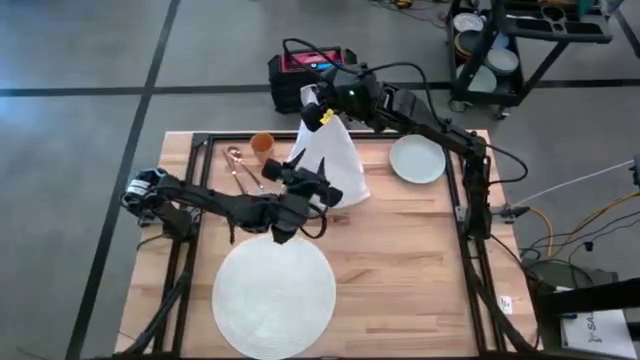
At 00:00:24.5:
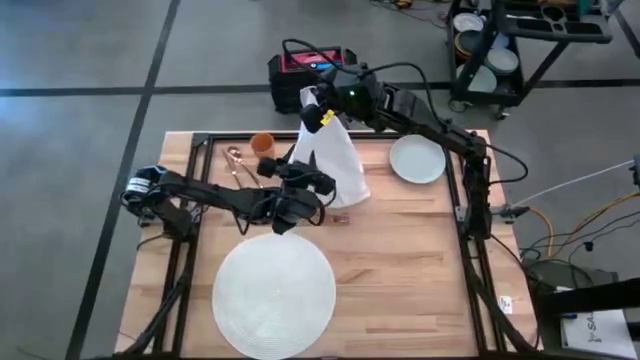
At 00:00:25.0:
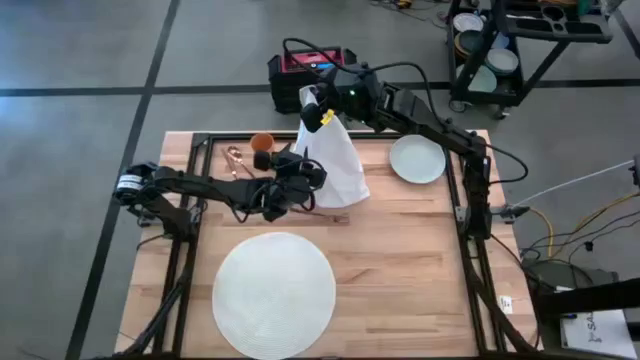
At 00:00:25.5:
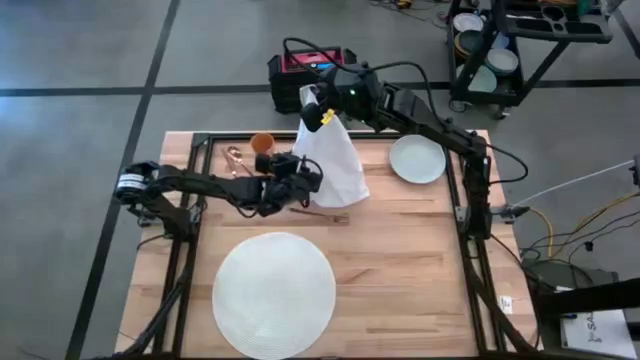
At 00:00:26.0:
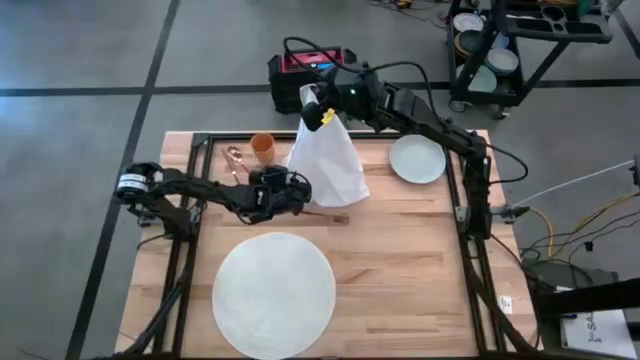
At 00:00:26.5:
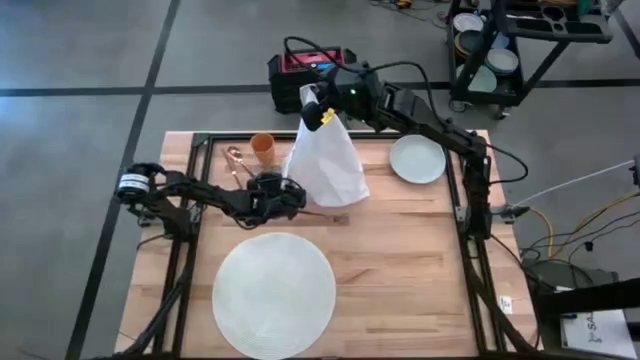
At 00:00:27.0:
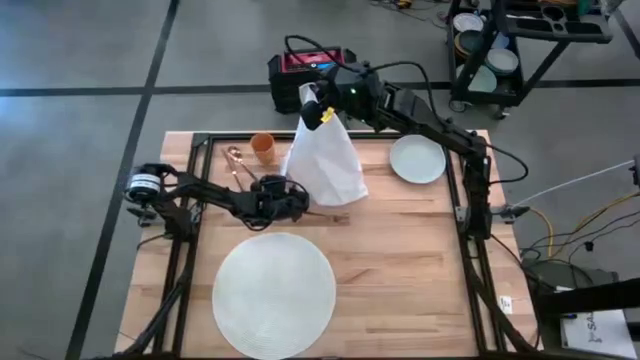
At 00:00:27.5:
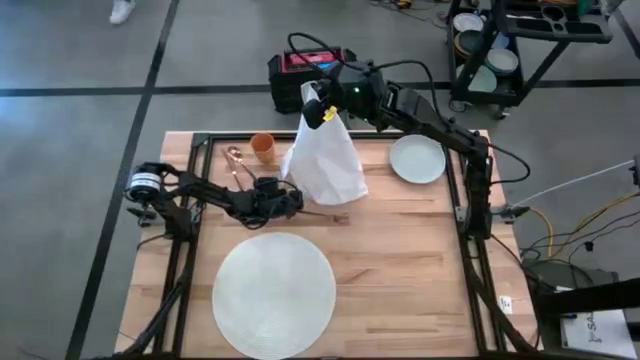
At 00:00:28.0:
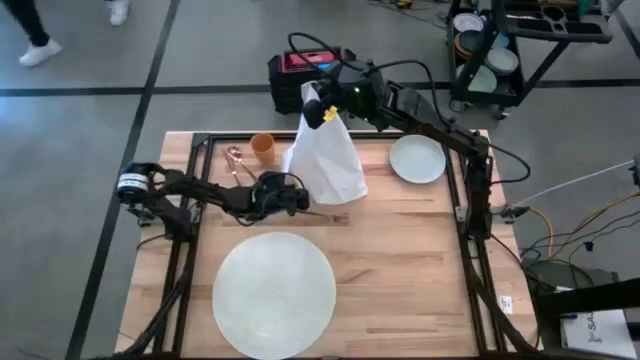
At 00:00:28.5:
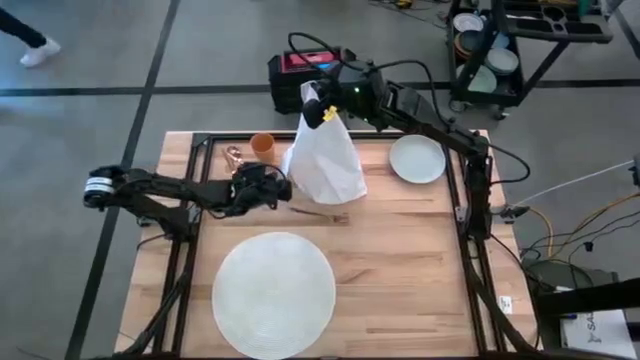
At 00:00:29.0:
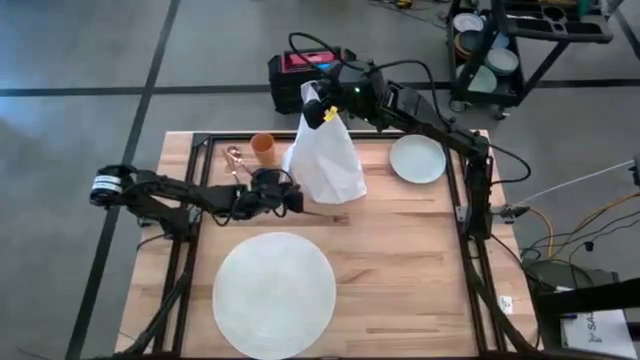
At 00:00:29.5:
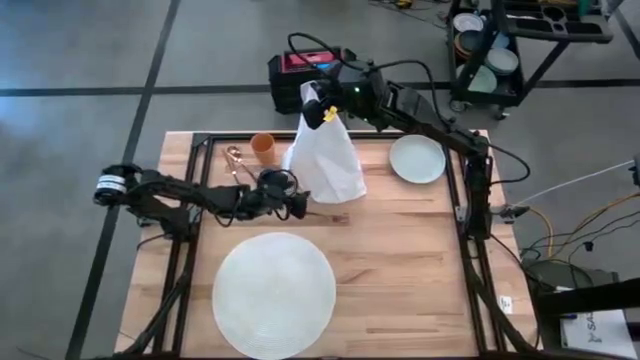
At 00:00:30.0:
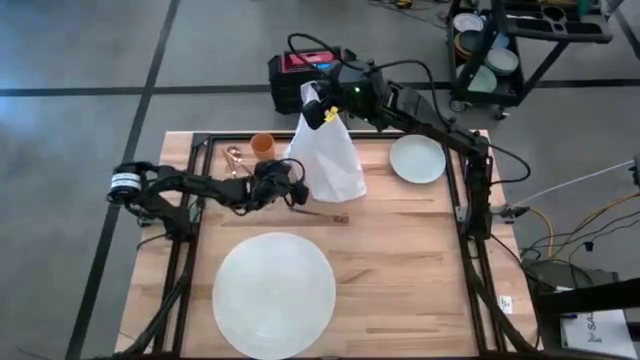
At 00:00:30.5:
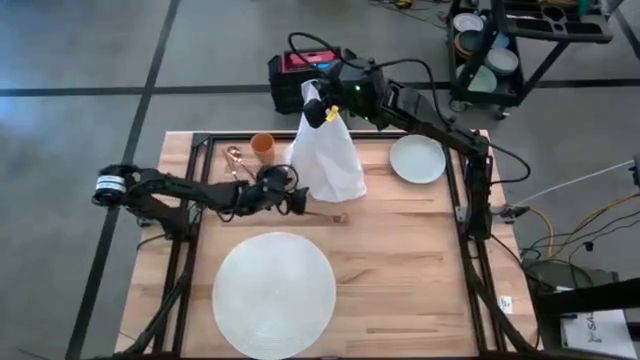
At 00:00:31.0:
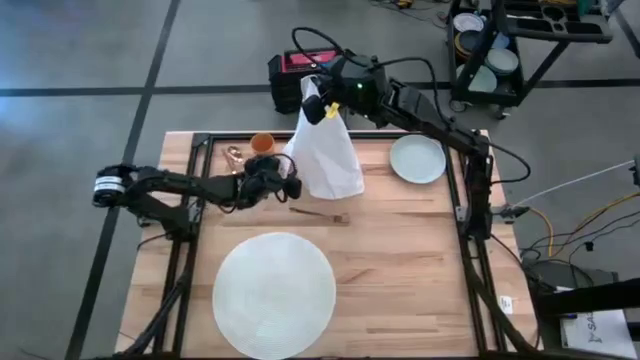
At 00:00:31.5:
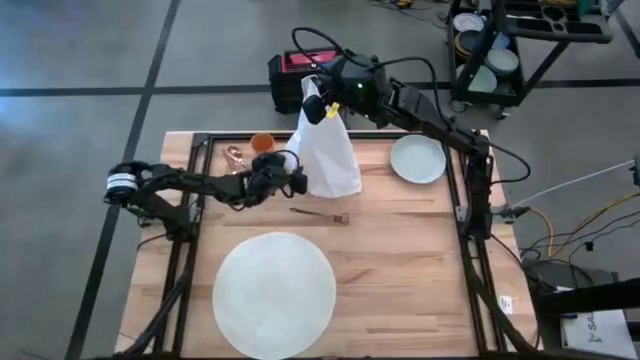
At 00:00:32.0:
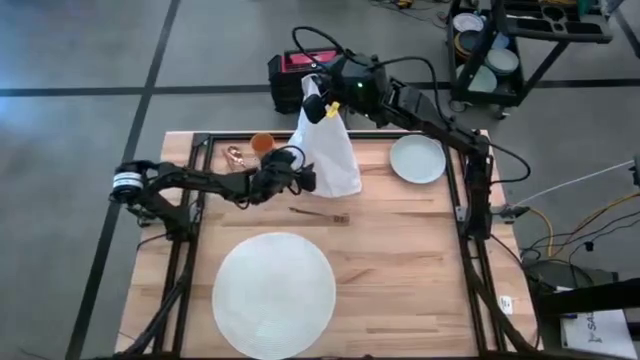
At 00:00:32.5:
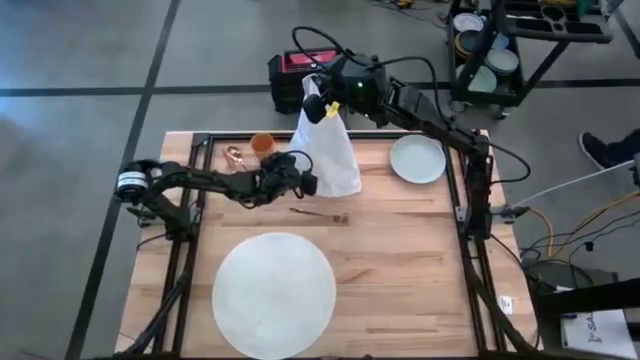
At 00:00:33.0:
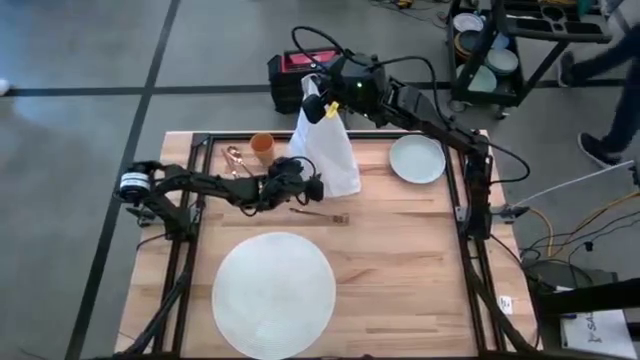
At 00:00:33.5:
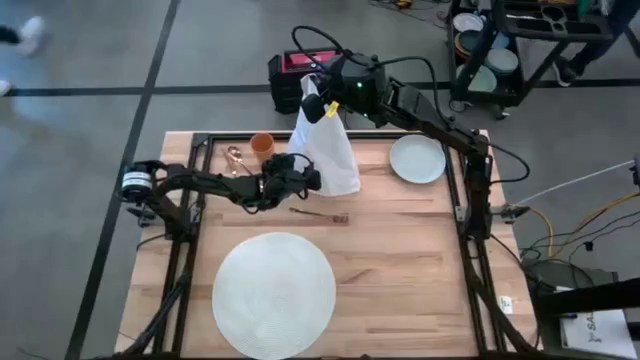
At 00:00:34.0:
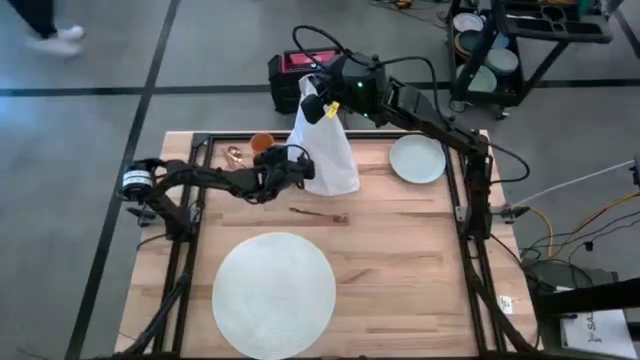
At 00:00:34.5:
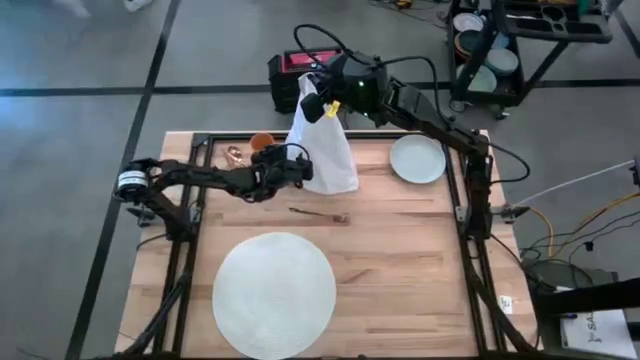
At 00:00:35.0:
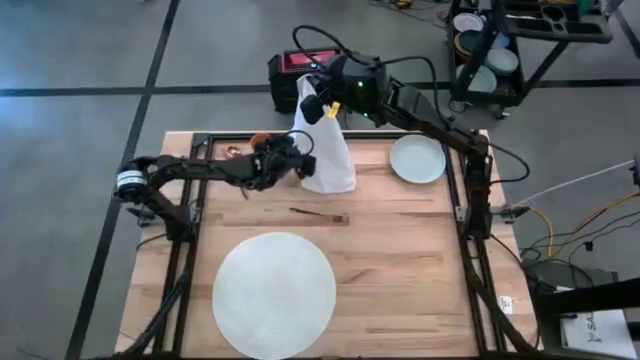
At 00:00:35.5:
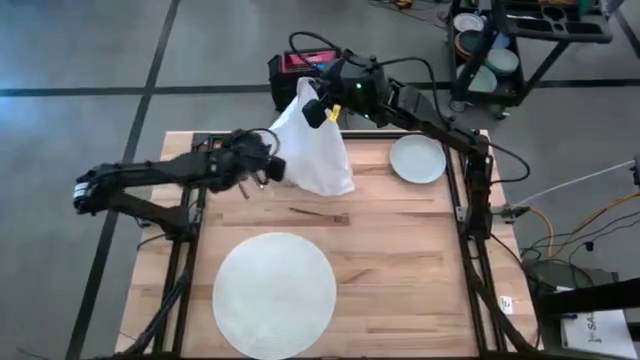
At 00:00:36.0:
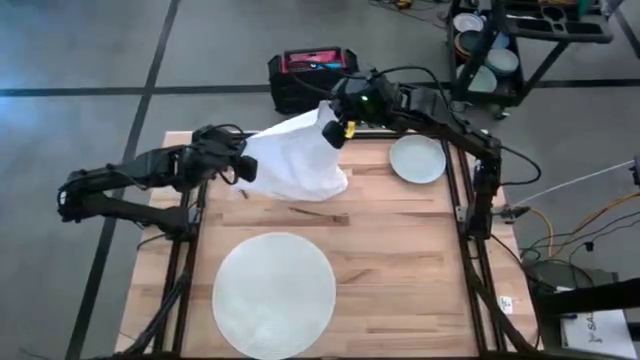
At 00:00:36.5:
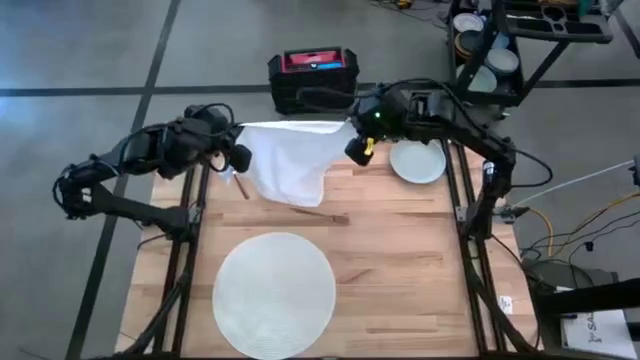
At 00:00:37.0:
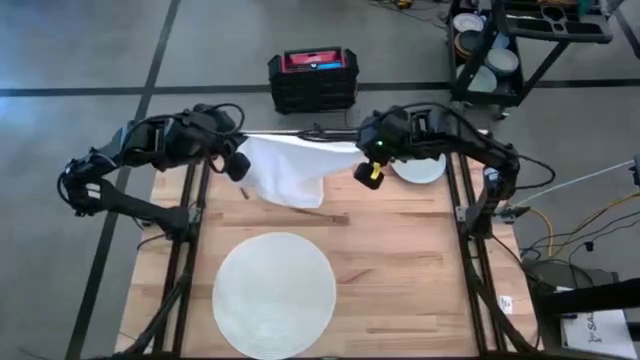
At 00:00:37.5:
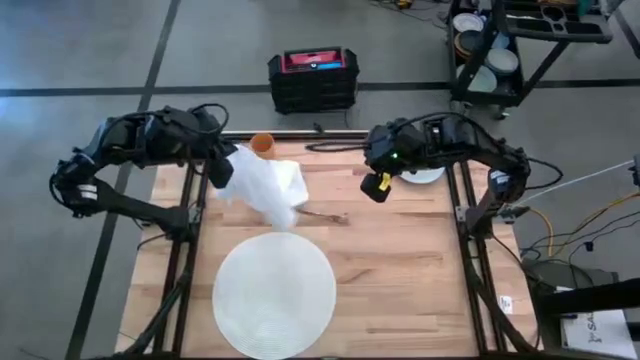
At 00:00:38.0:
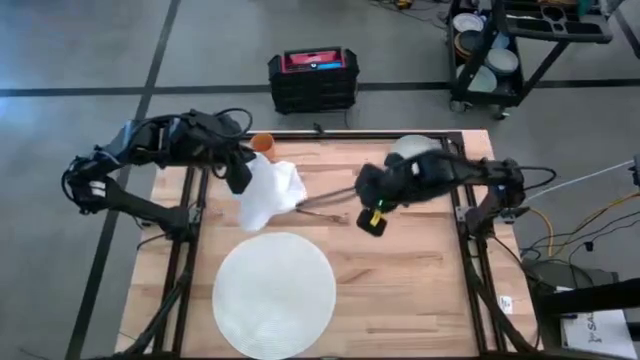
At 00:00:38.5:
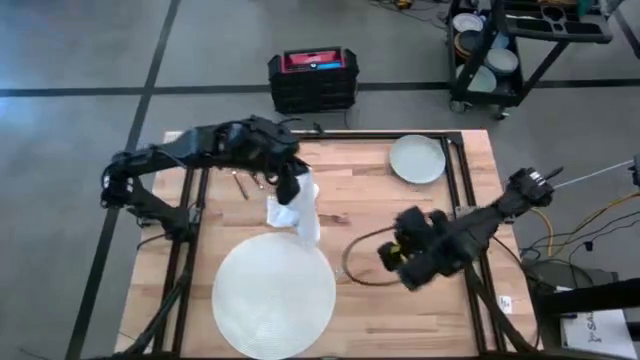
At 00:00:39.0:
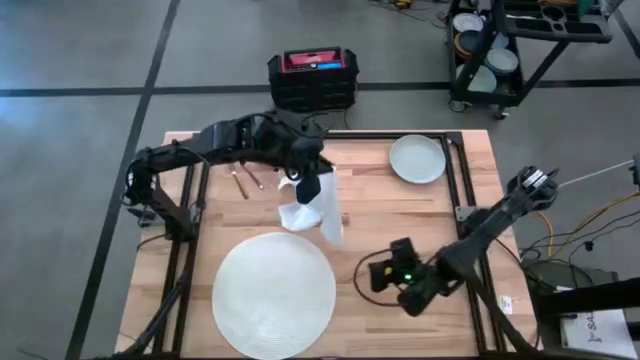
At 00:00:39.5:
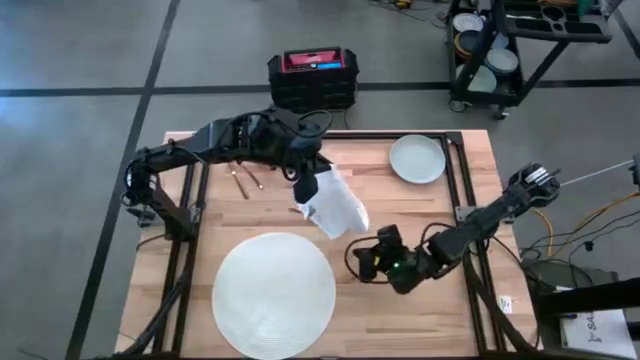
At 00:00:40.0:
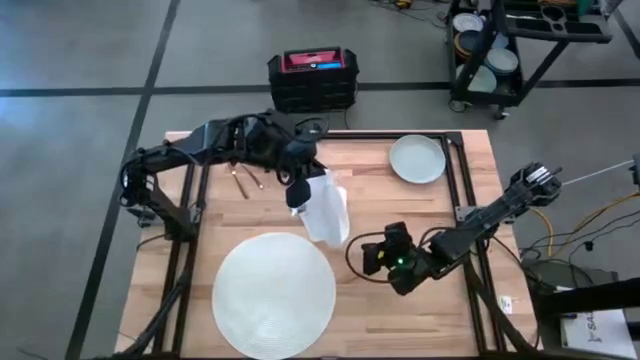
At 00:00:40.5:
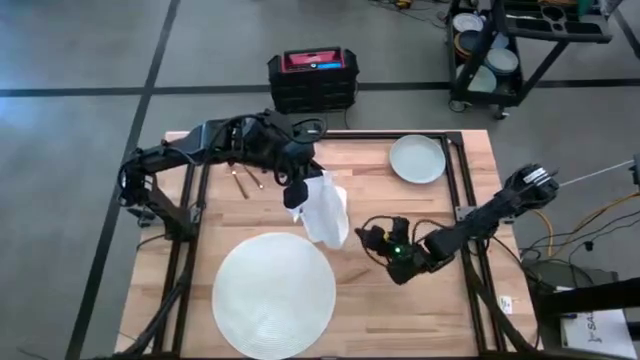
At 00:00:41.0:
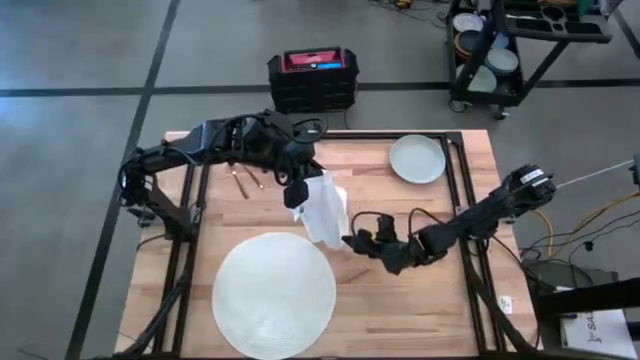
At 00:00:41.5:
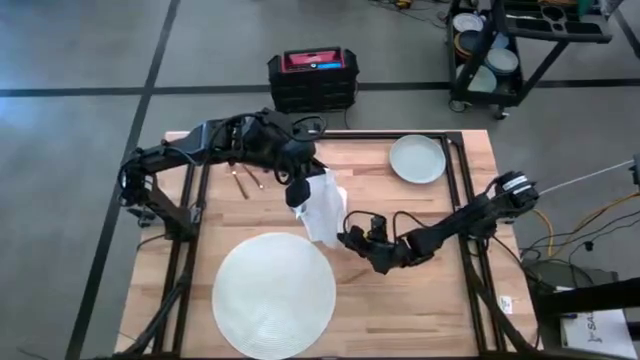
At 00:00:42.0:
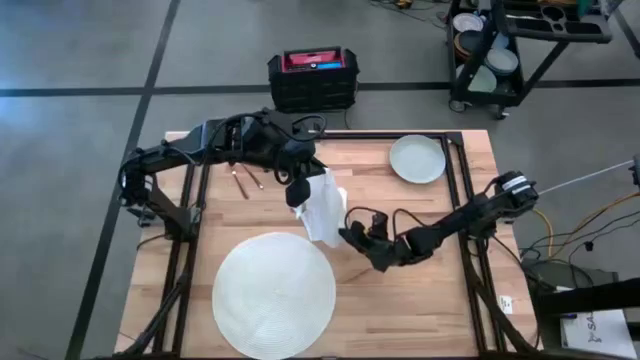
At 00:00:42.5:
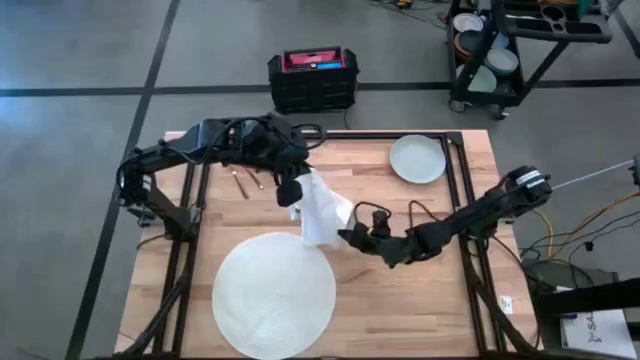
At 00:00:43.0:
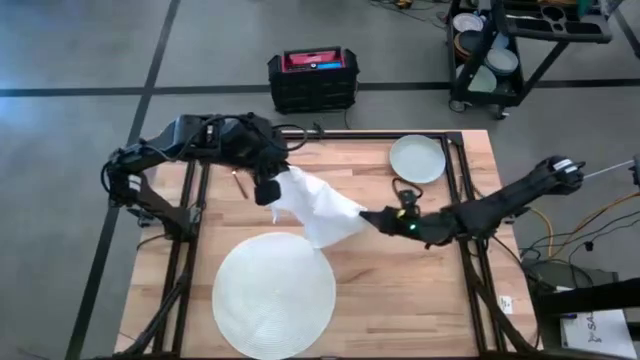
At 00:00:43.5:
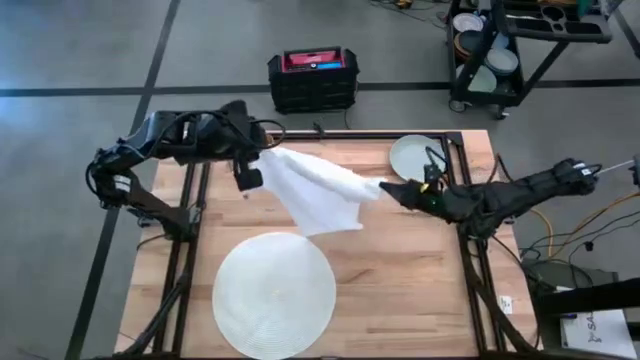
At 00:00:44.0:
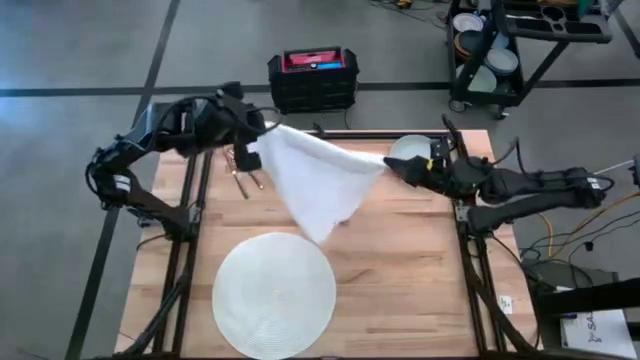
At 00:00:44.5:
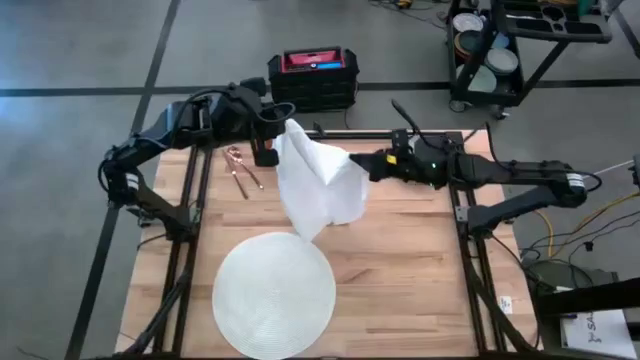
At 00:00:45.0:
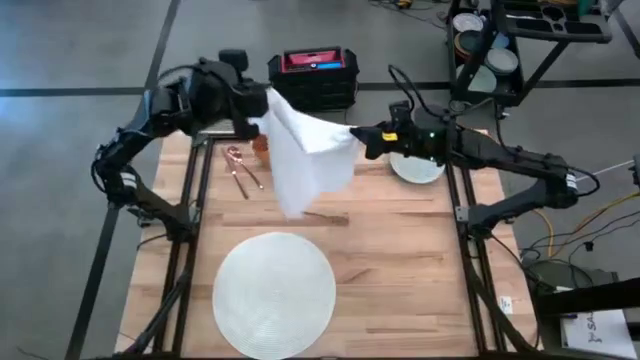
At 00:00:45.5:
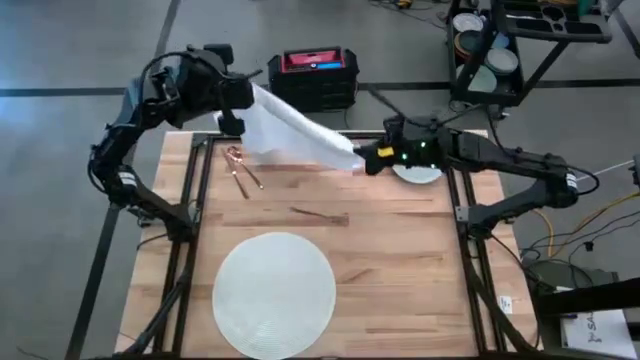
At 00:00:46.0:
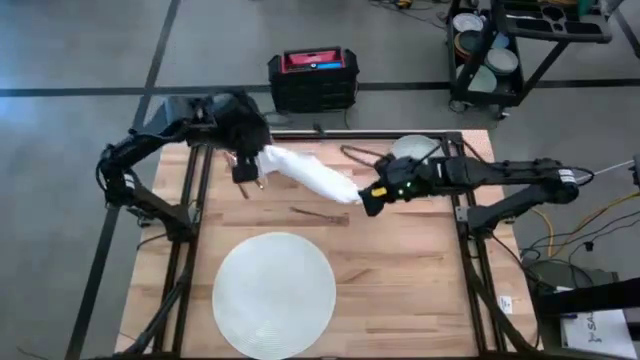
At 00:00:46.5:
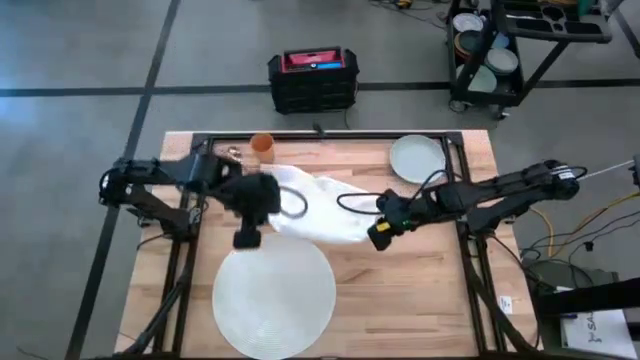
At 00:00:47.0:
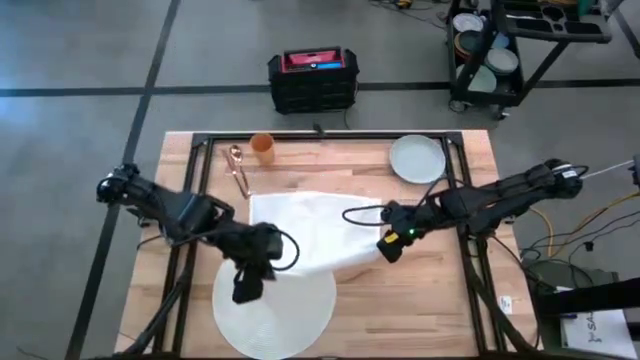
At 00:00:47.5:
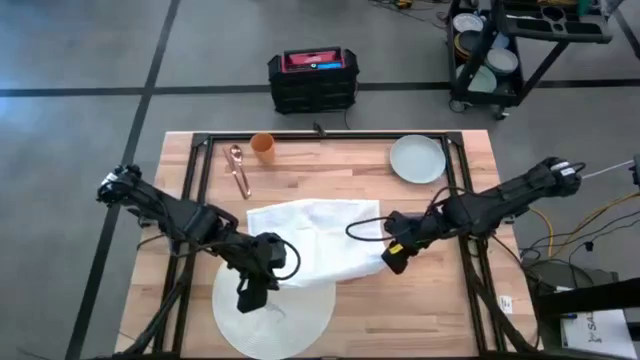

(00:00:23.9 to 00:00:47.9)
Task: Set table place
Fold the white napkin
